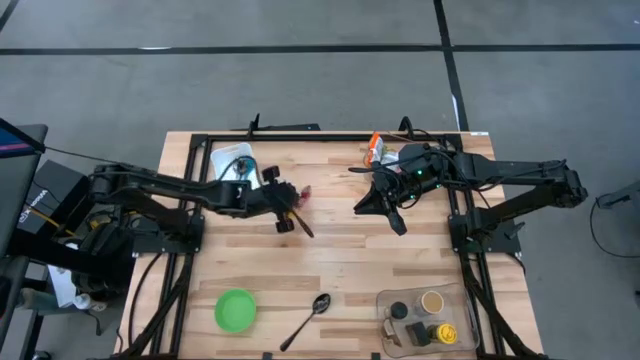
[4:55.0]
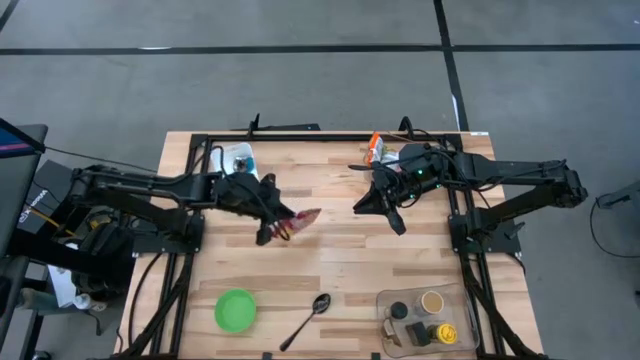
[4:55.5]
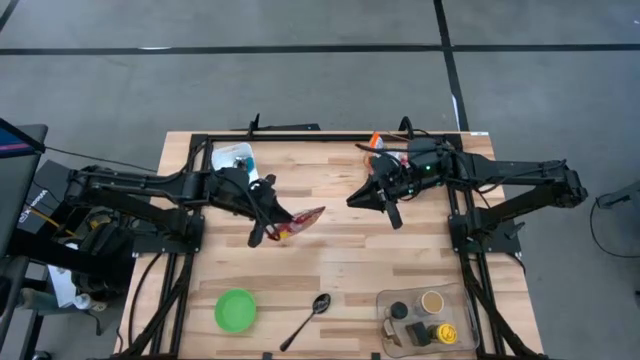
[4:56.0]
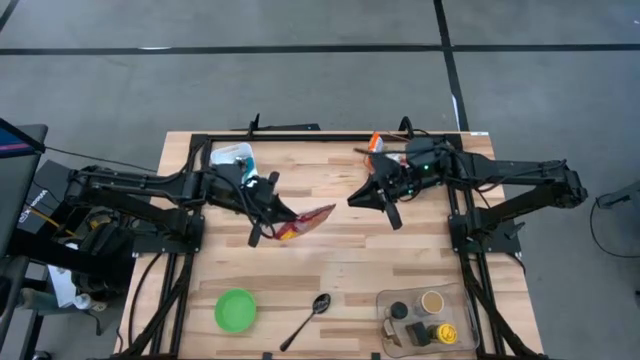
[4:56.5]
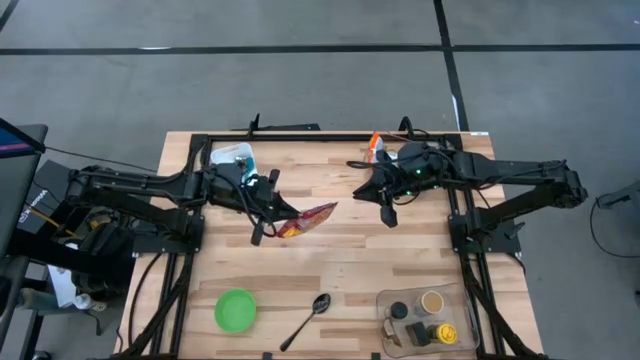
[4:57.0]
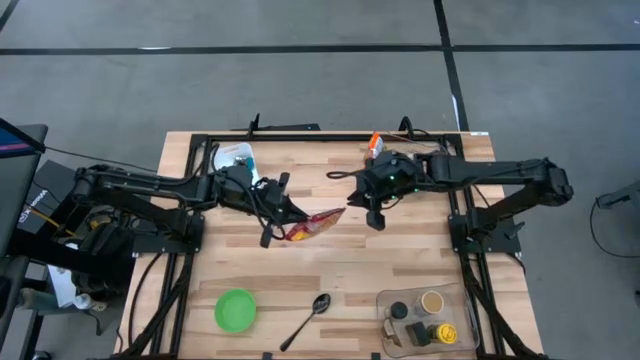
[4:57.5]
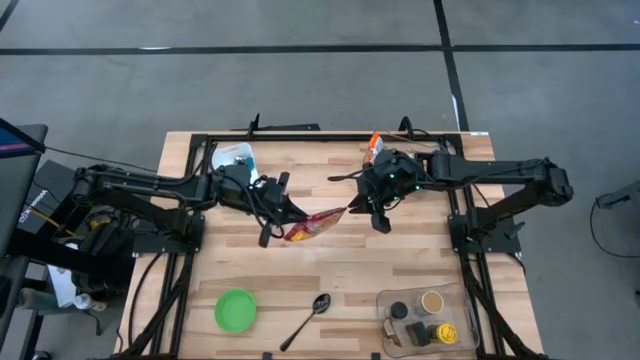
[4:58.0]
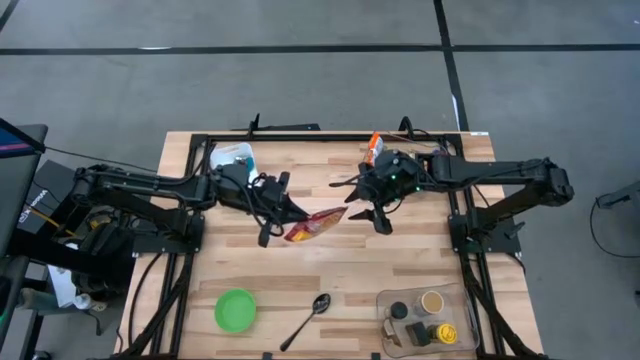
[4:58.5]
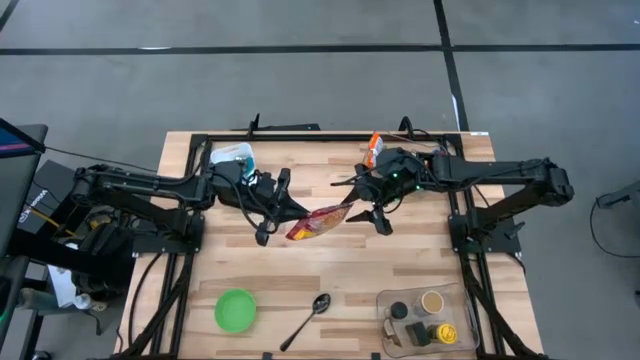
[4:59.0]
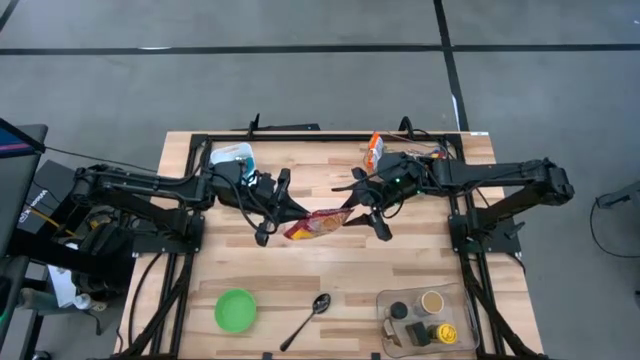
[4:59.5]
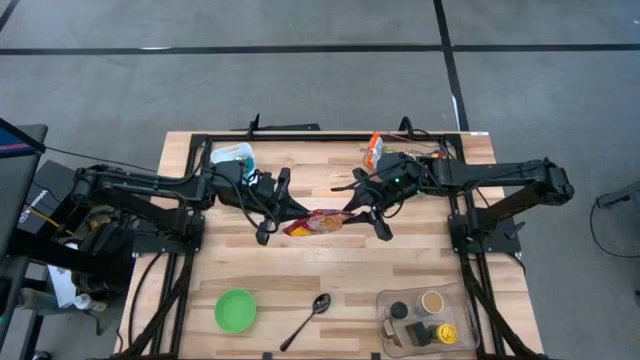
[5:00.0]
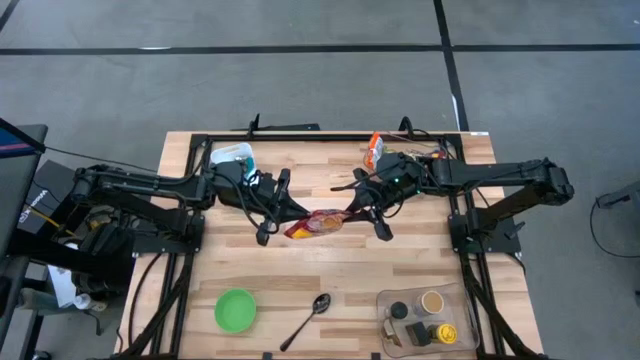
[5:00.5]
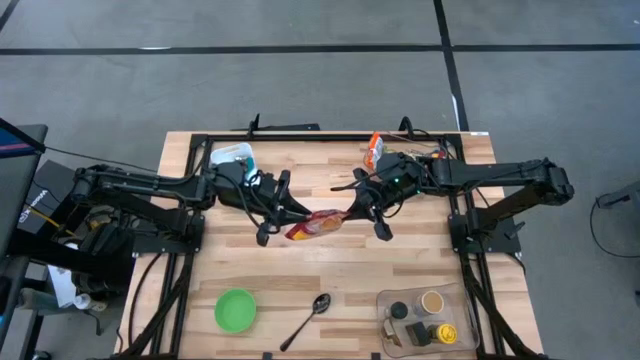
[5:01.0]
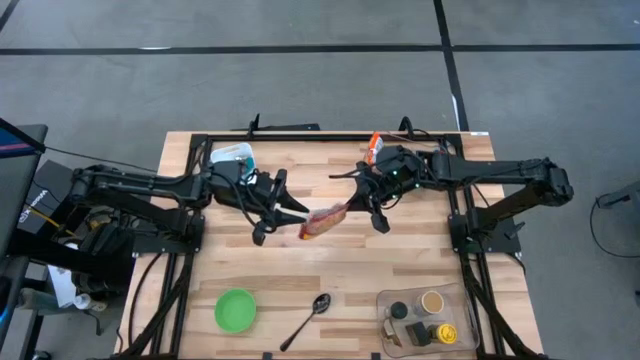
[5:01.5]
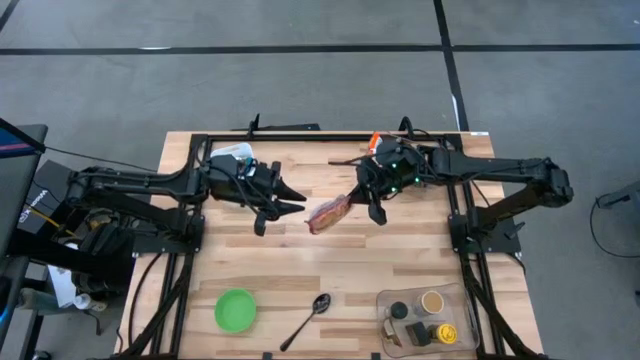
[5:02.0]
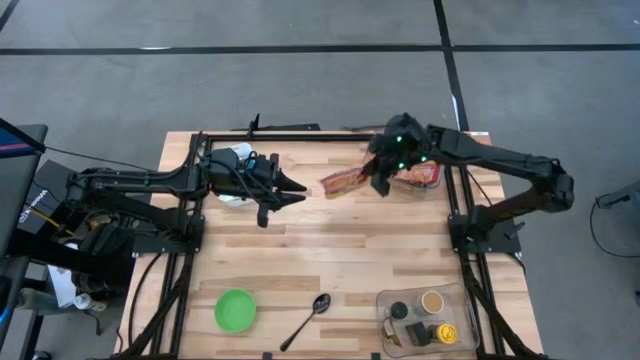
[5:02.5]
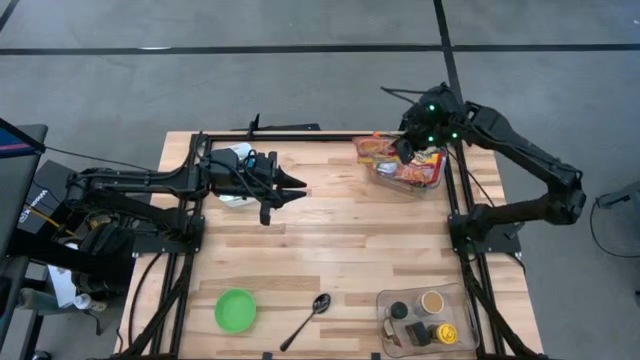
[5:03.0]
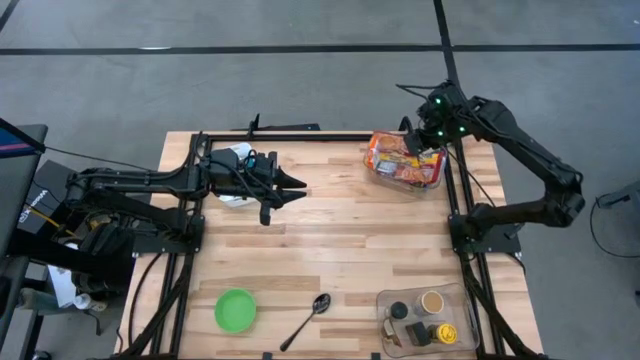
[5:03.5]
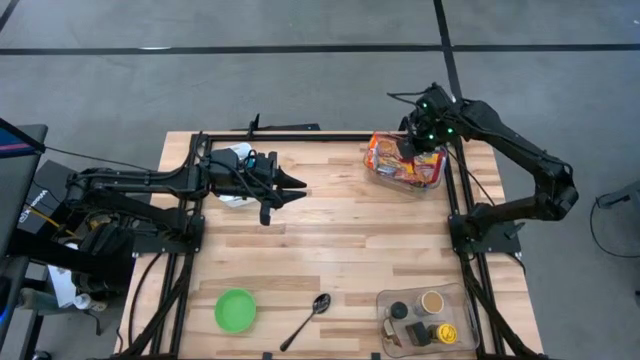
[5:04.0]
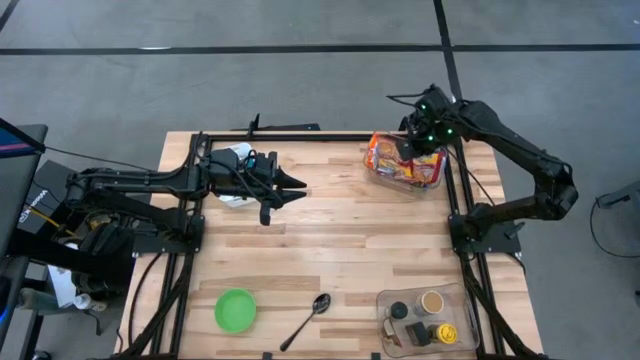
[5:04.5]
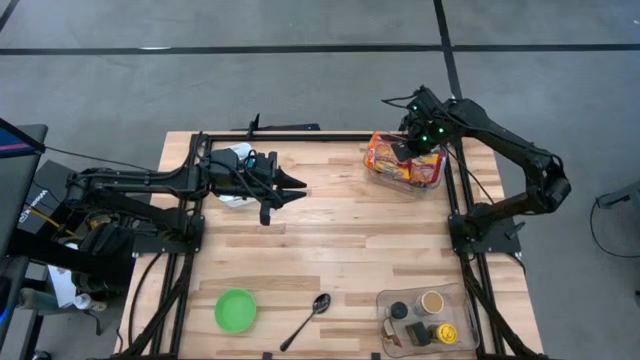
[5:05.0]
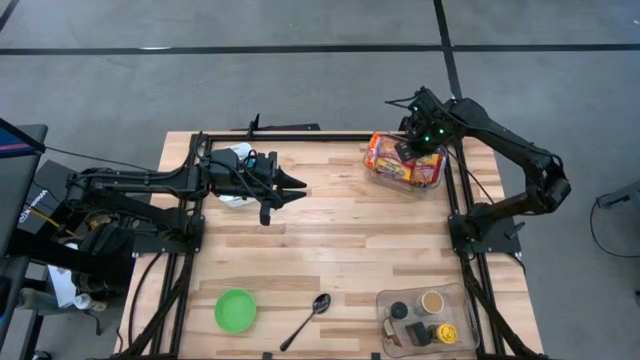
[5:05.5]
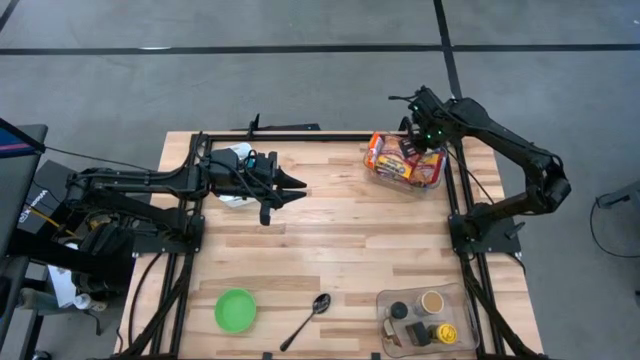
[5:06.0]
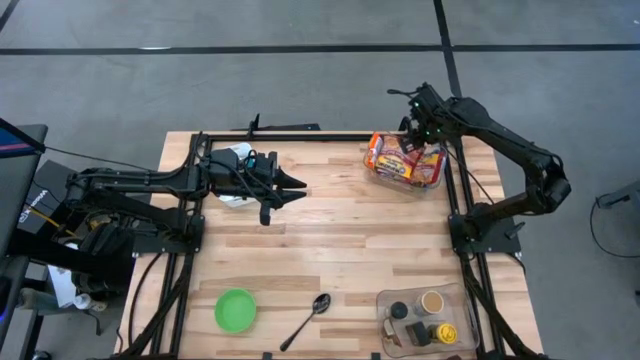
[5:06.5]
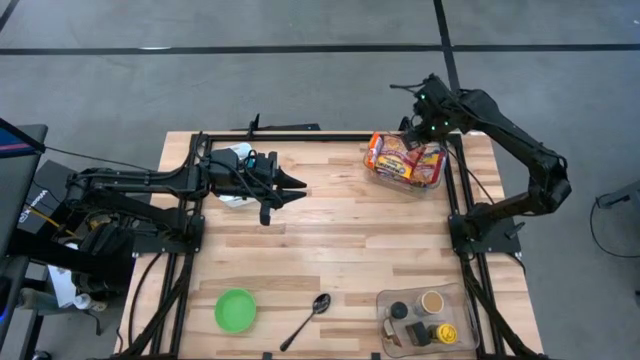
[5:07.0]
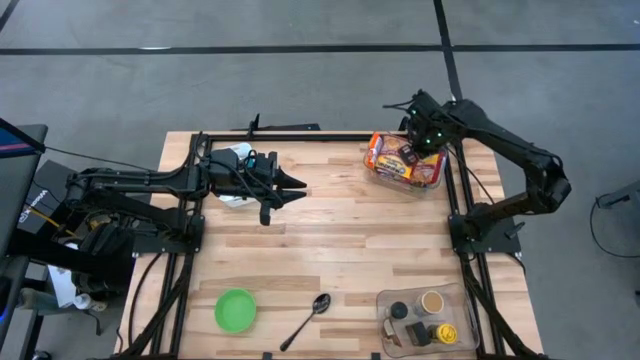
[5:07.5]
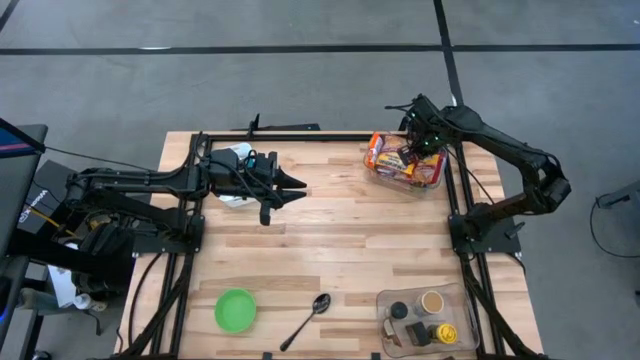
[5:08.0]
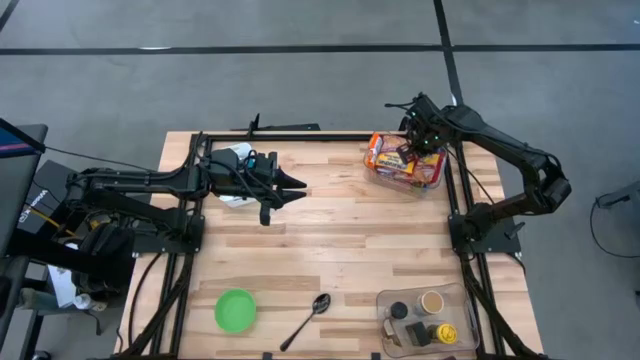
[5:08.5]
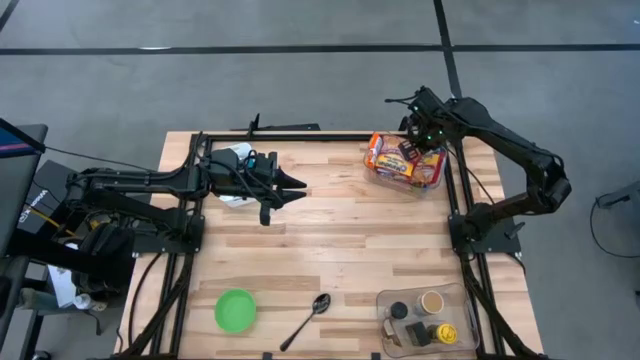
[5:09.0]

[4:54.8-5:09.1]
Task: Pick & Place Food Item
Put the red noodle pack into the top transparent bin

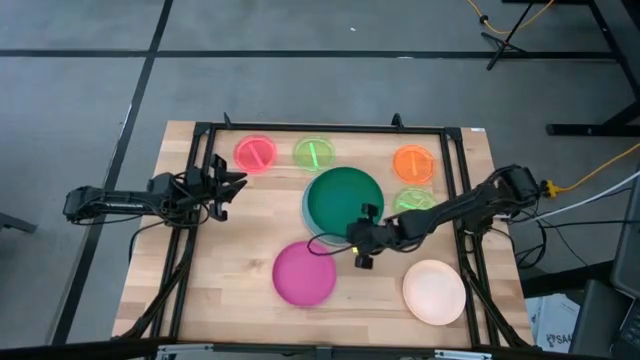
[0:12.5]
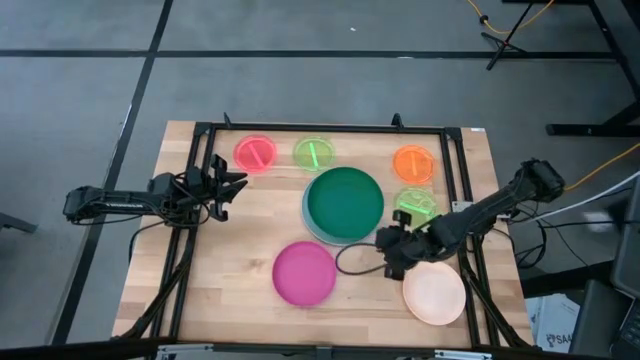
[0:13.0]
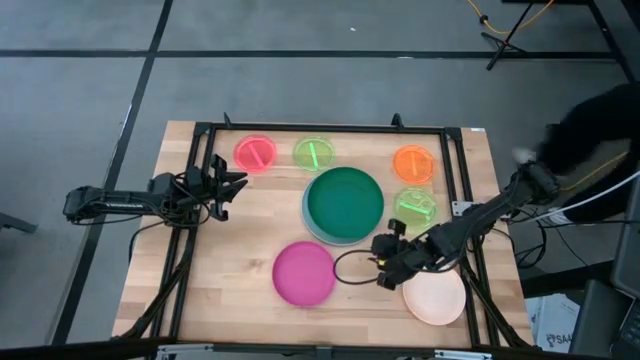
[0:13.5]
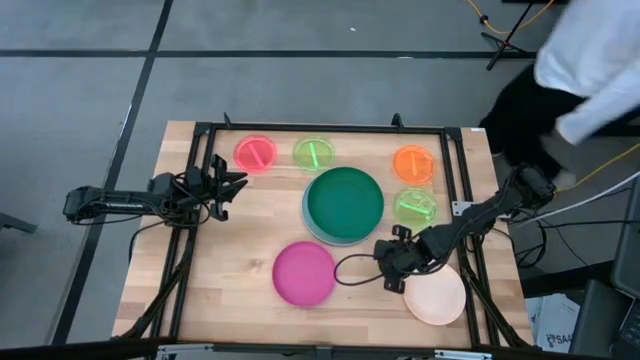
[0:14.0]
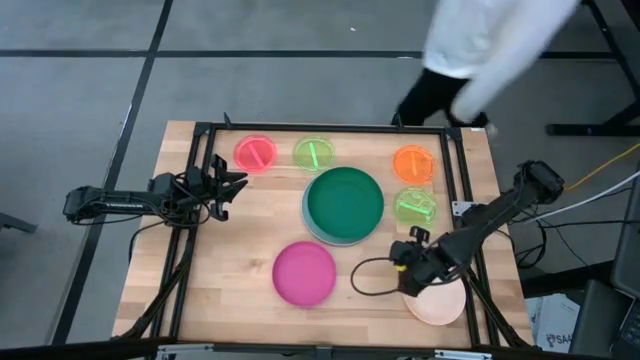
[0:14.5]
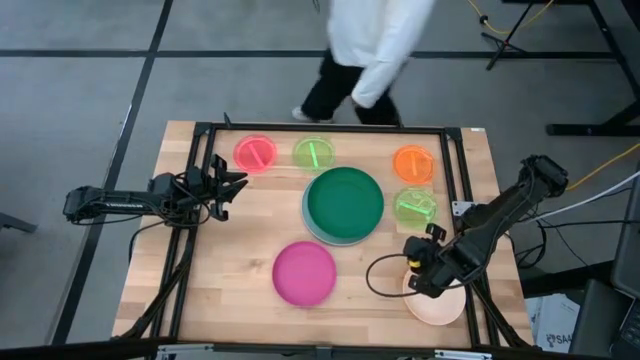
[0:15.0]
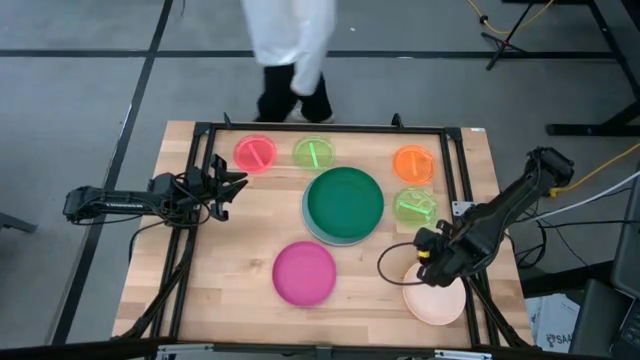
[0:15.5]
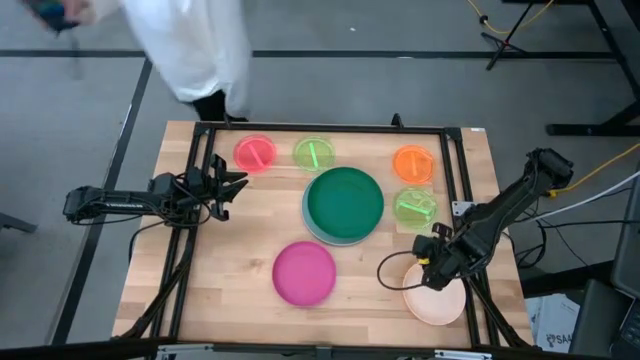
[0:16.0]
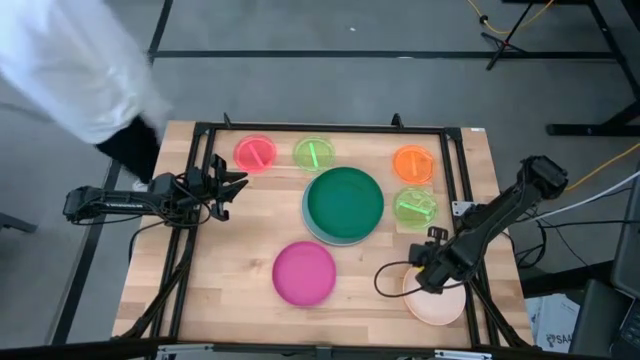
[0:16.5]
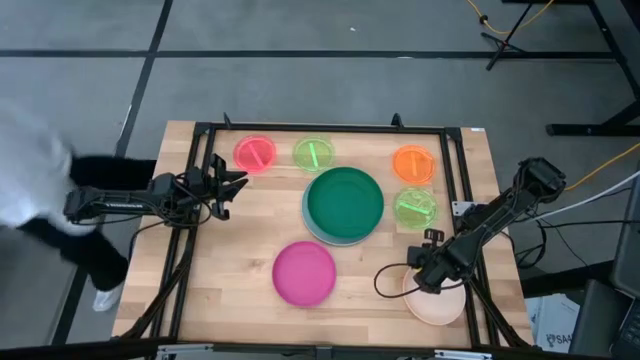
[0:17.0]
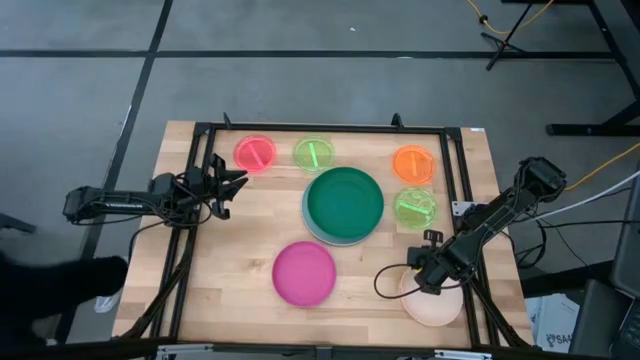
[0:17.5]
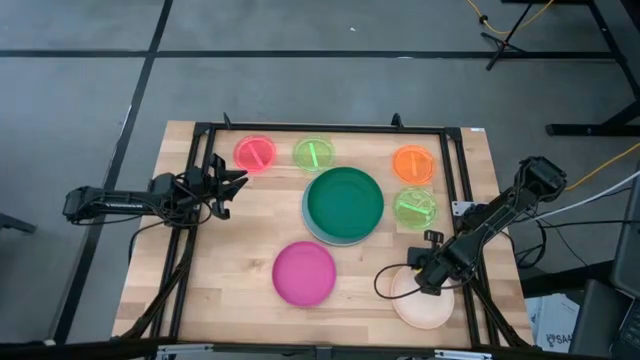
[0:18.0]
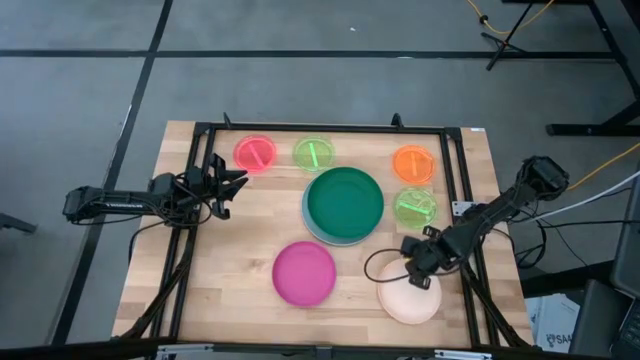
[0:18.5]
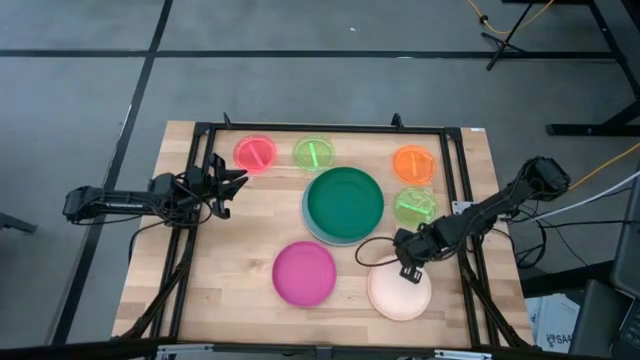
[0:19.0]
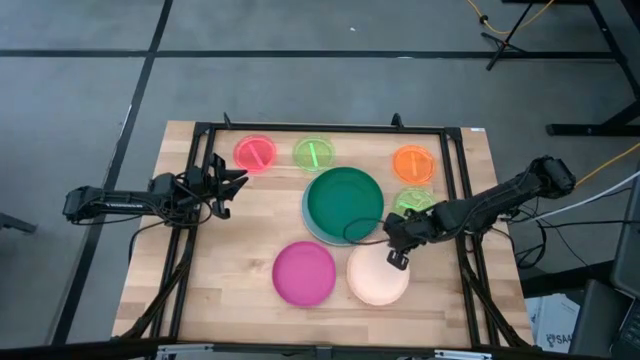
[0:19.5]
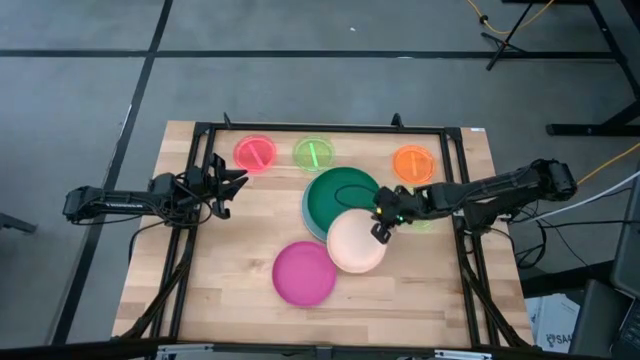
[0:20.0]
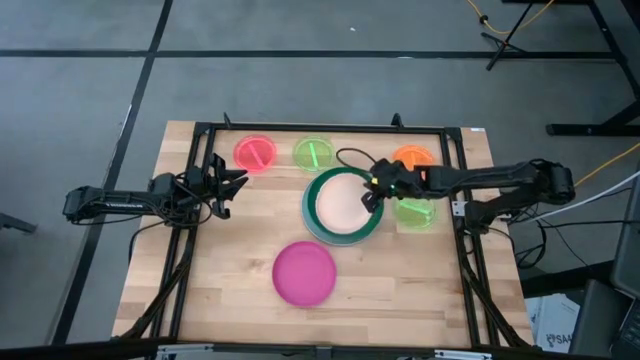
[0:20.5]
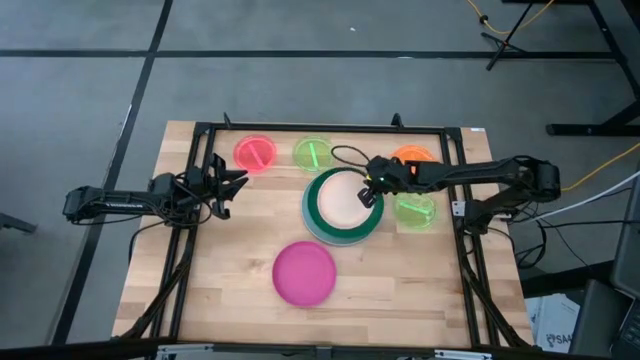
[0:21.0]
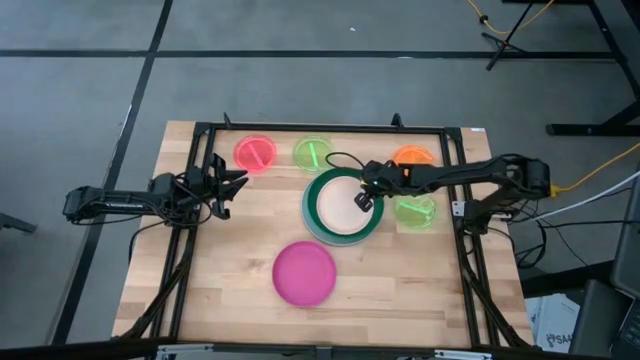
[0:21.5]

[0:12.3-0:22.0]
Task: Stack plastic plates
Stack the light orange plate on the green plate
